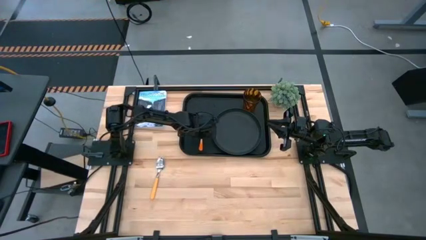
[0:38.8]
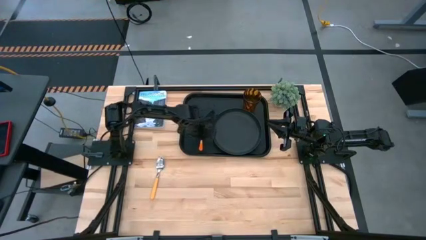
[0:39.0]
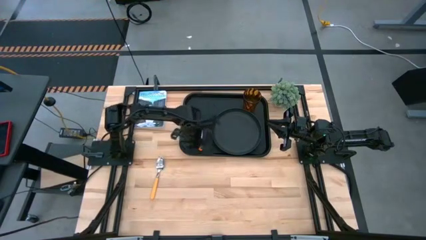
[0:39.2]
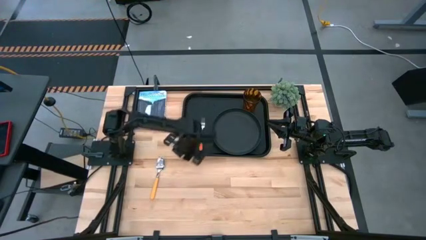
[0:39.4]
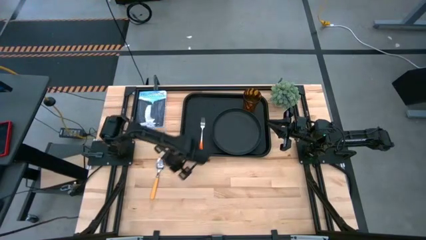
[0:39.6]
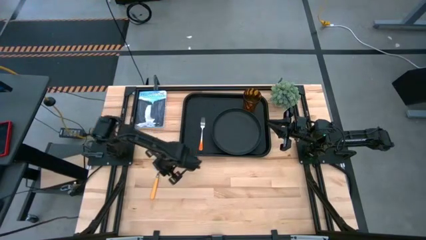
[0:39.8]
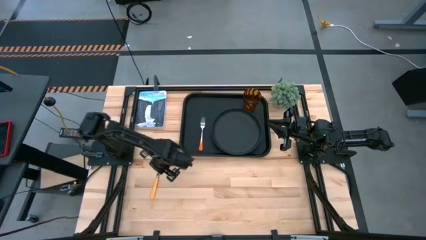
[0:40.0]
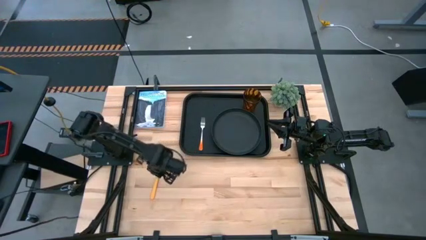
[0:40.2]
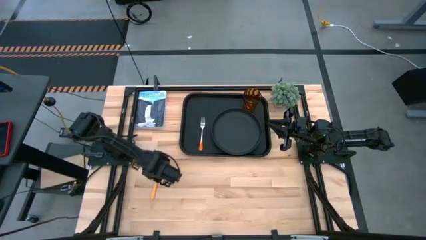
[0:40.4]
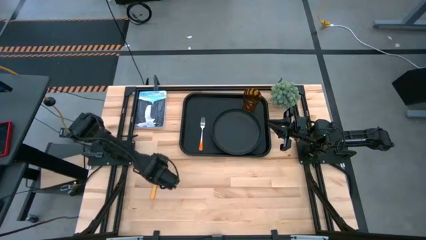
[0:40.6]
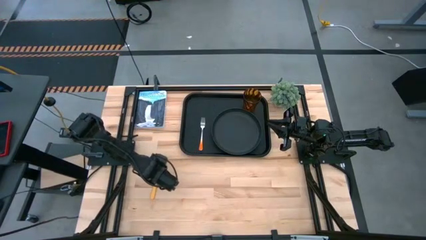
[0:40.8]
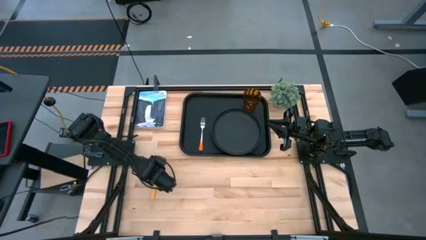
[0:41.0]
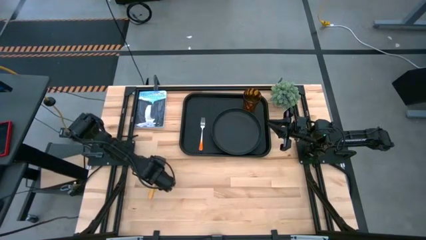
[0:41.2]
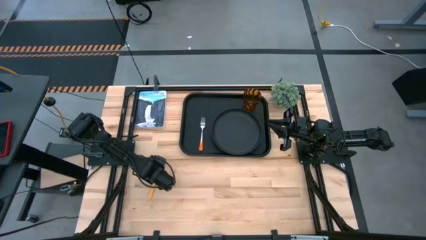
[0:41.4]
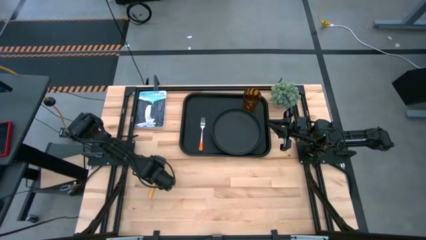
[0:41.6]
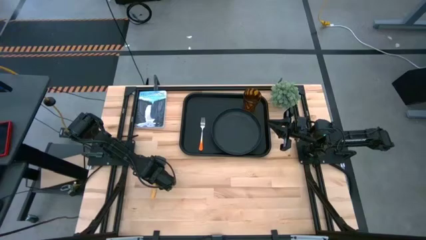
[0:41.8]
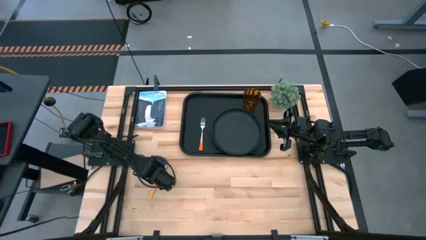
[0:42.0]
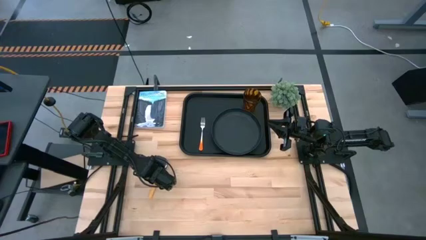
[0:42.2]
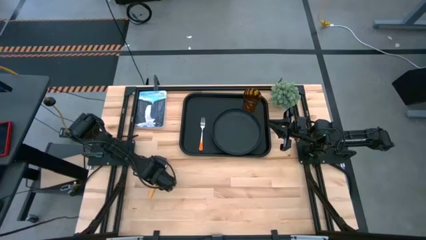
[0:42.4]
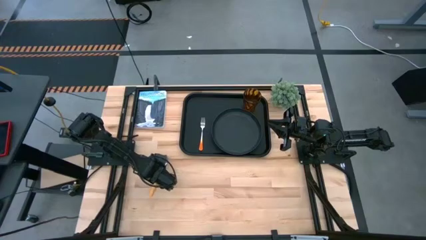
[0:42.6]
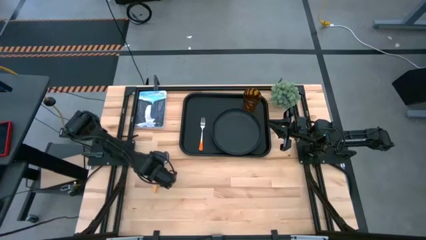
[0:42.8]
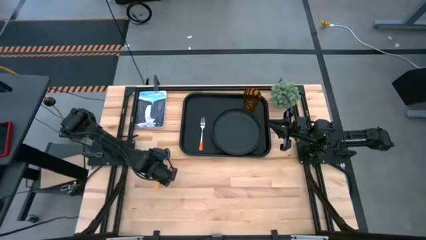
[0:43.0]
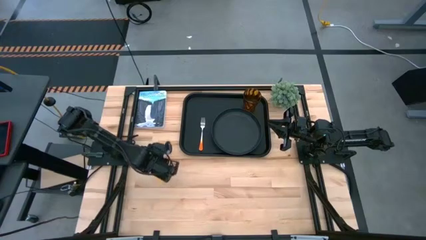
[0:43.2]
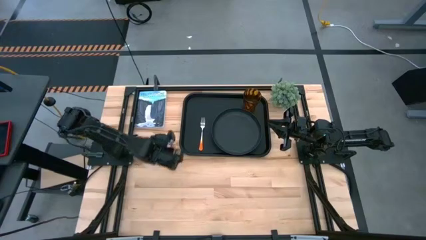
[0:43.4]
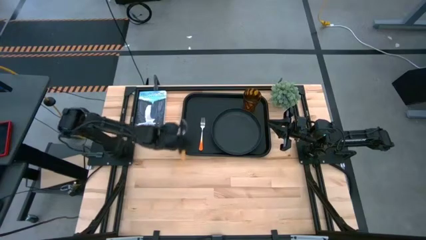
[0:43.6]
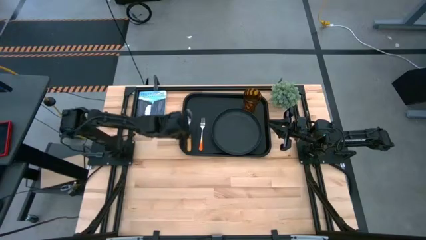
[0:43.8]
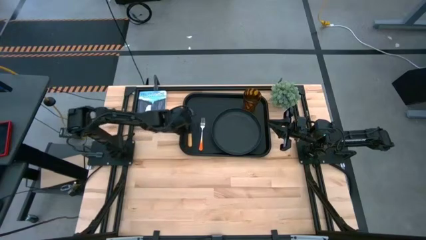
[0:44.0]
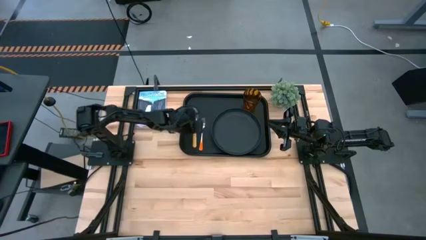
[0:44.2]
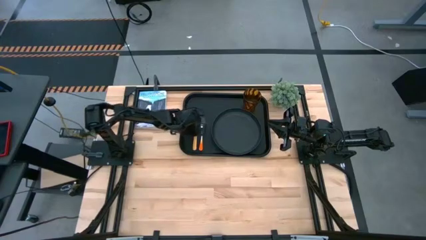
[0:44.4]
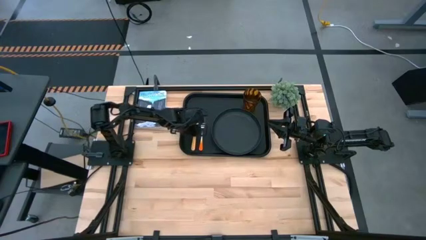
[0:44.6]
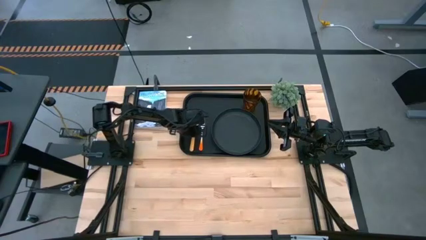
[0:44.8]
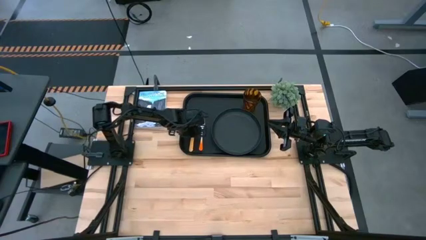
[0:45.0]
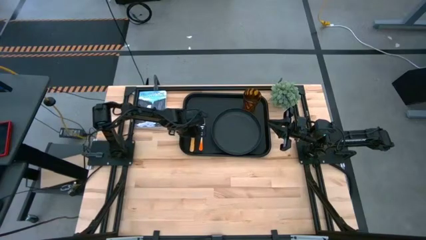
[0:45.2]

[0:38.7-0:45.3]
Task: Pick and place plate/cup/fork/spoon on tray
Put the yellow spoon to the left of the orange fork on the black tray

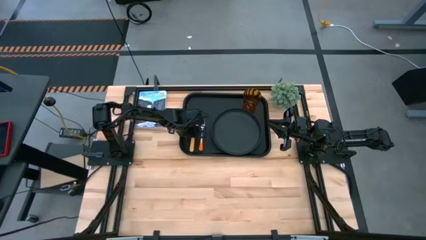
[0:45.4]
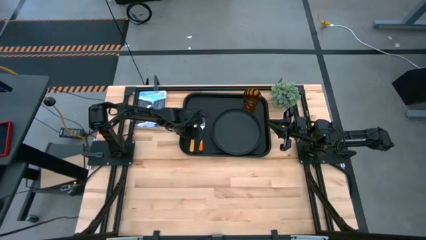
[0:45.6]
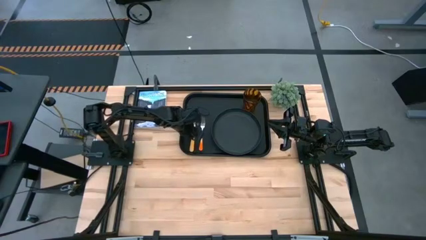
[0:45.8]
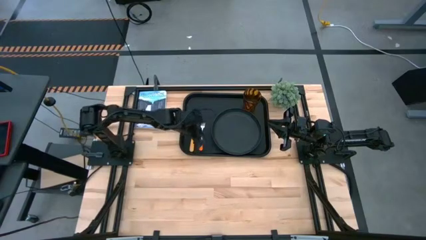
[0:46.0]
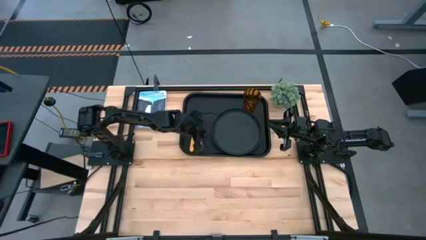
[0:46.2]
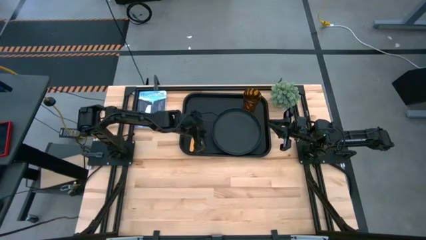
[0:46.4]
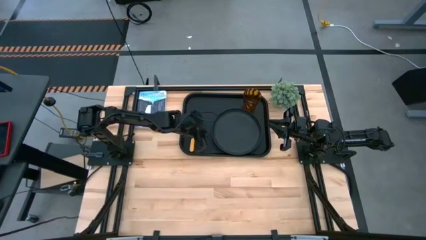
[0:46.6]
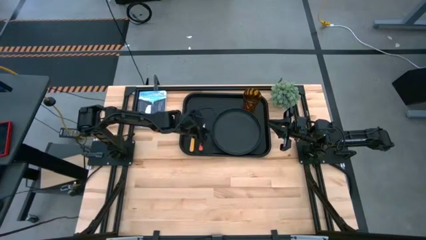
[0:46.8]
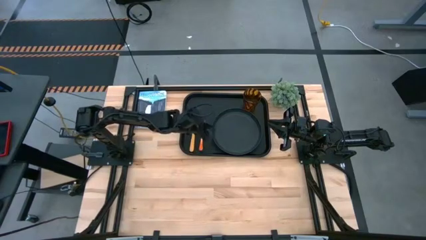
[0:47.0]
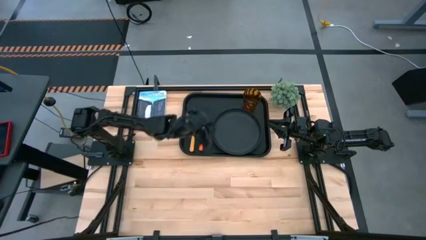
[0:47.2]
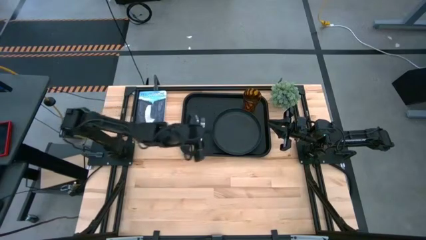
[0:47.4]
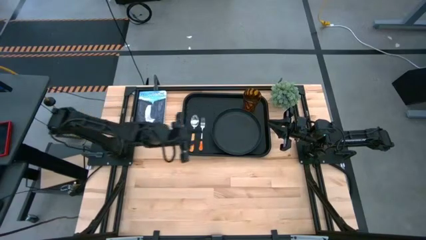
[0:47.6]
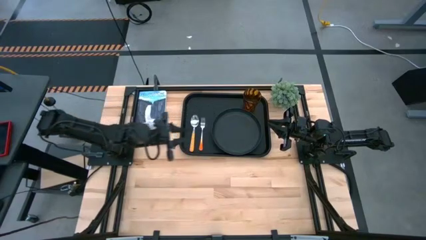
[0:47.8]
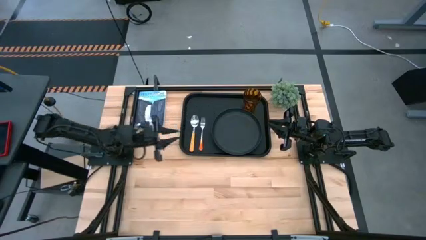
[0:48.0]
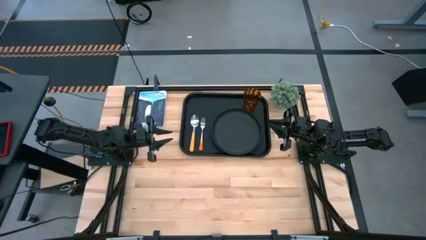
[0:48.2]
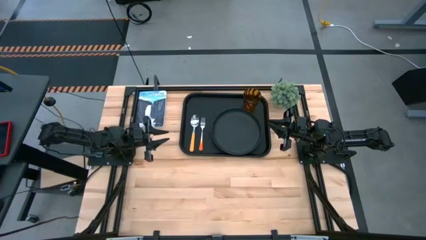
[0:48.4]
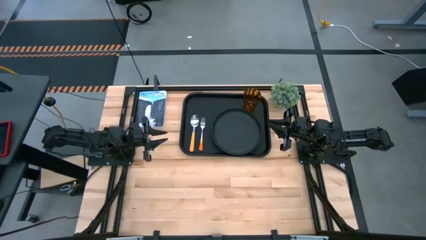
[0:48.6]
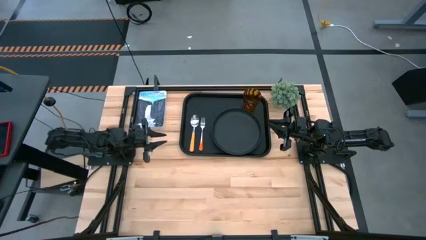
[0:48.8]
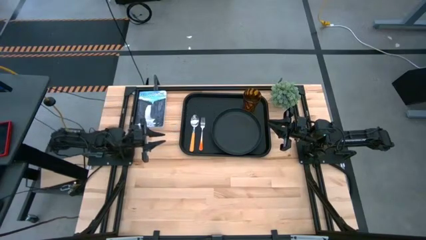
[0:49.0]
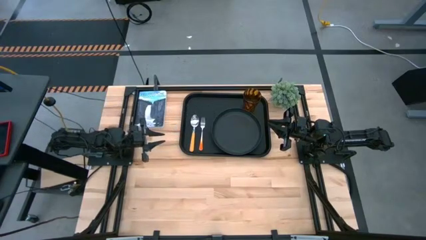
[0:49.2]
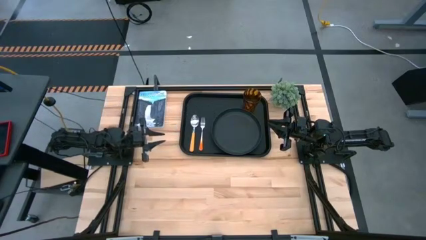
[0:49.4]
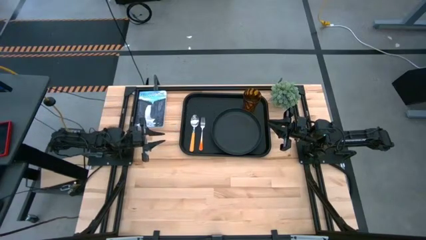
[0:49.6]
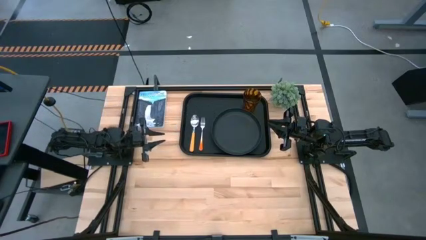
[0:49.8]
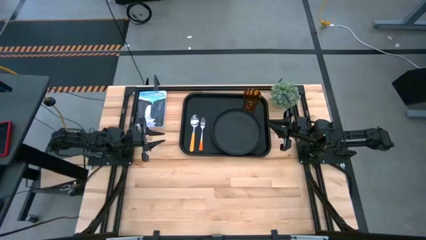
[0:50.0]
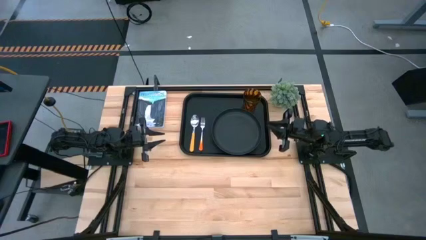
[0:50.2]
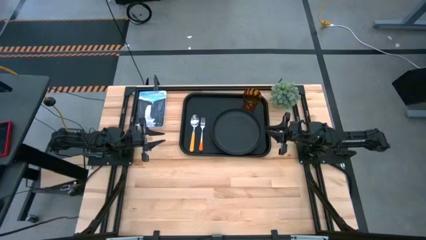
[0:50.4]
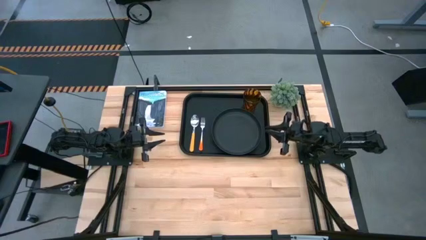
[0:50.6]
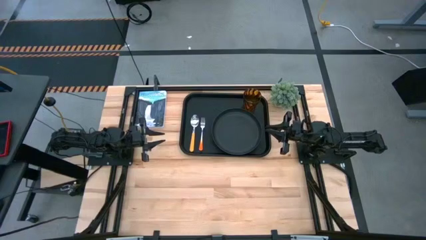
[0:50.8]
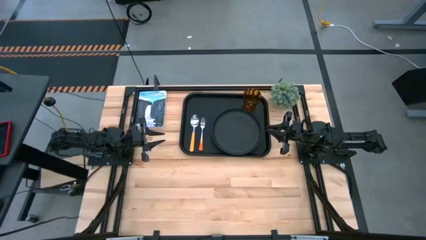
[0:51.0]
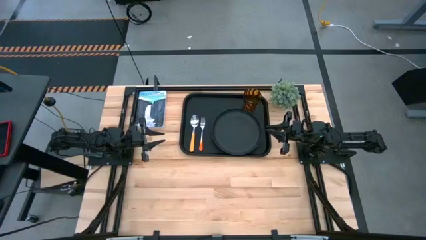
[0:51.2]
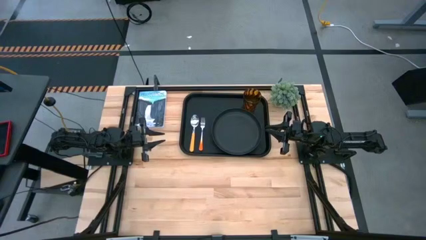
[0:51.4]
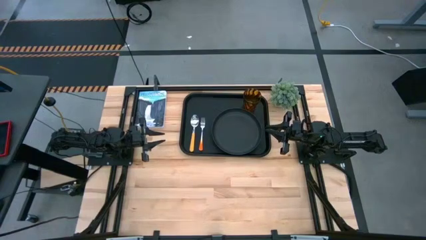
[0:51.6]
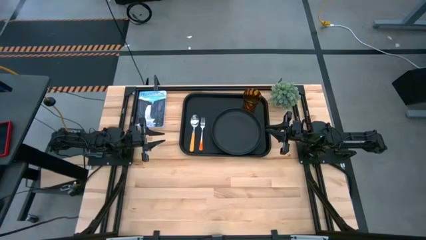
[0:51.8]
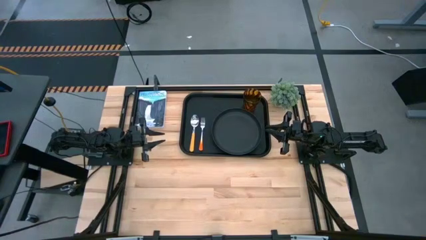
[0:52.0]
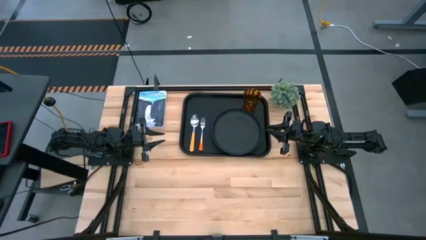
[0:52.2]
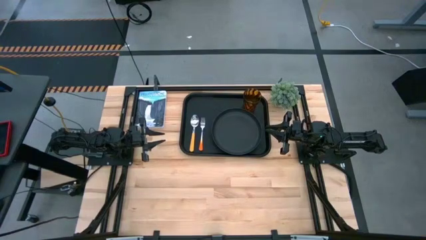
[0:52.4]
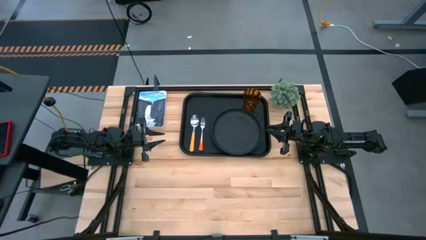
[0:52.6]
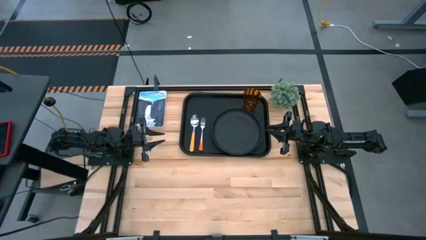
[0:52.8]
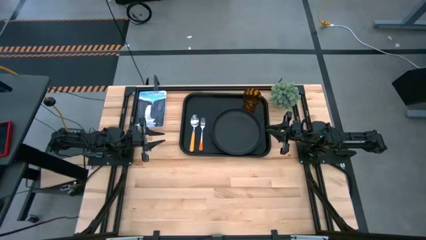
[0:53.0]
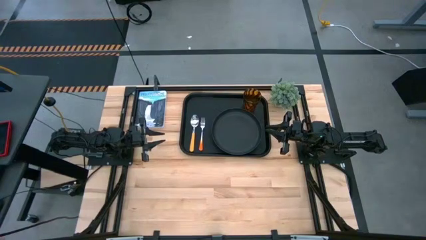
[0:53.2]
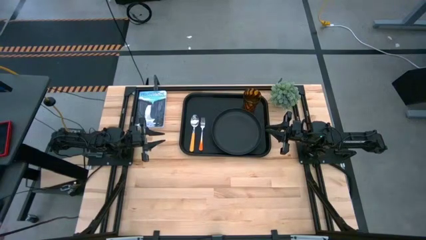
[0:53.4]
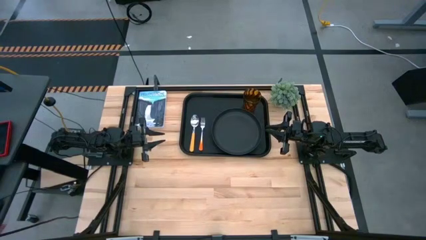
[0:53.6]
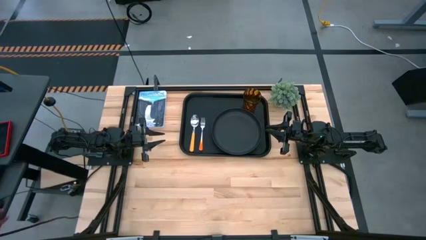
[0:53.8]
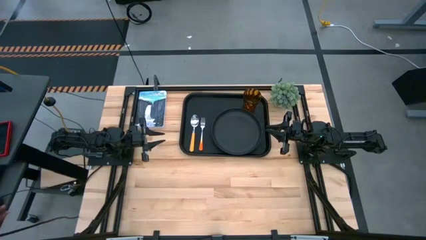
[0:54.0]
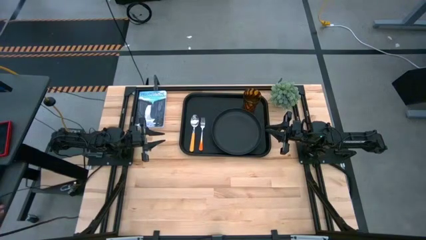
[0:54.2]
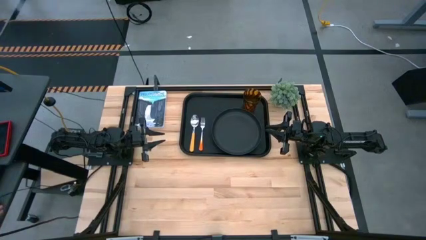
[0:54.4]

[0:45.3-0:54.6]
Return to Home Position
